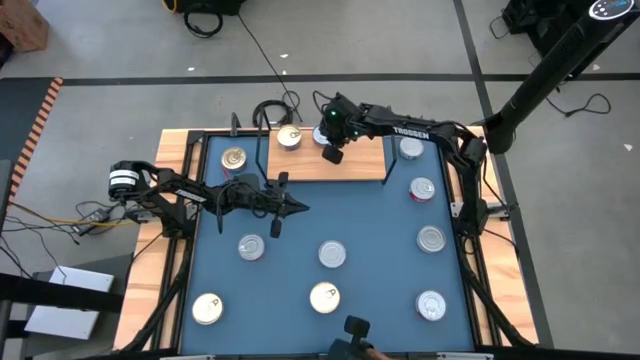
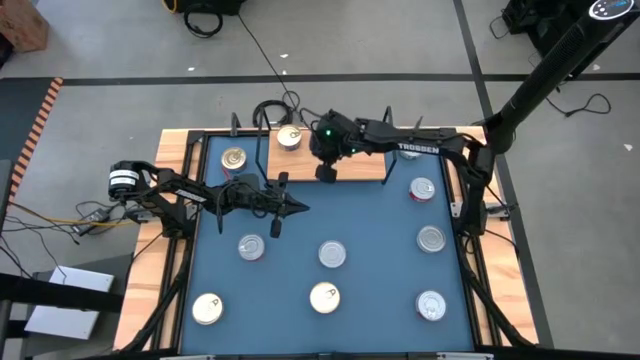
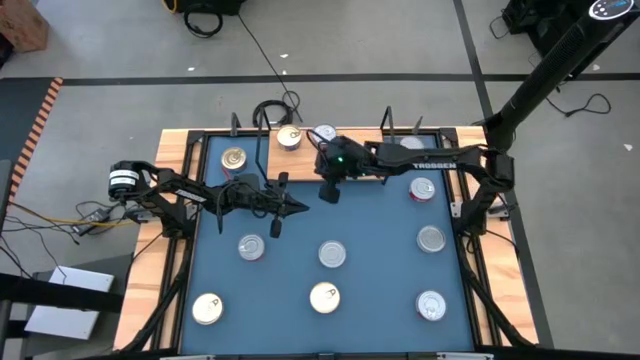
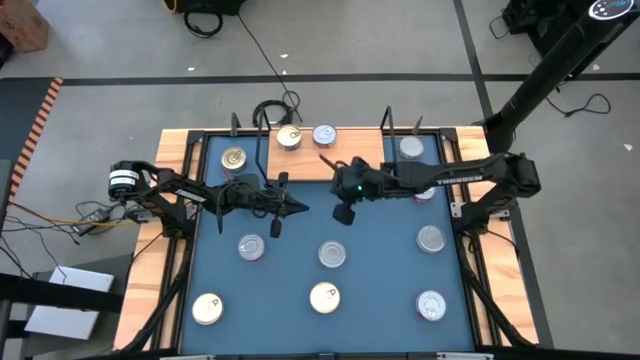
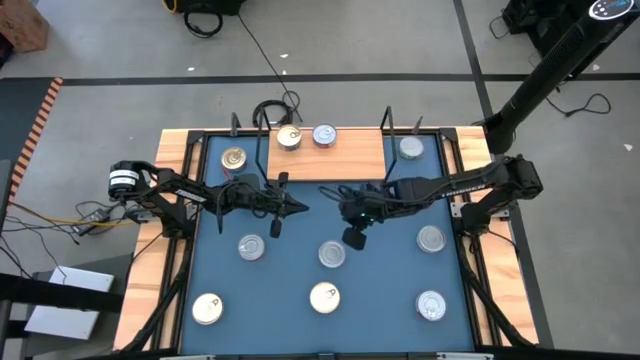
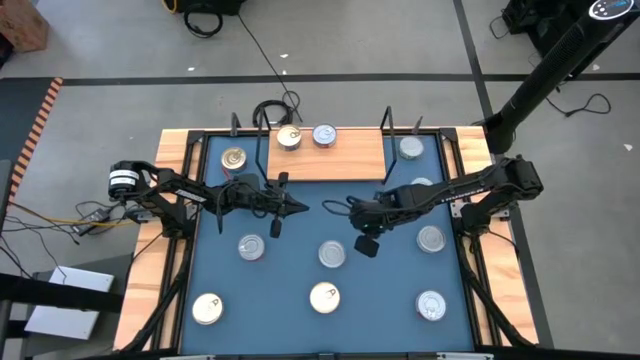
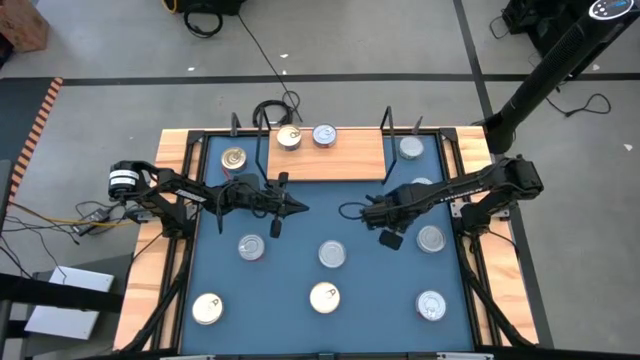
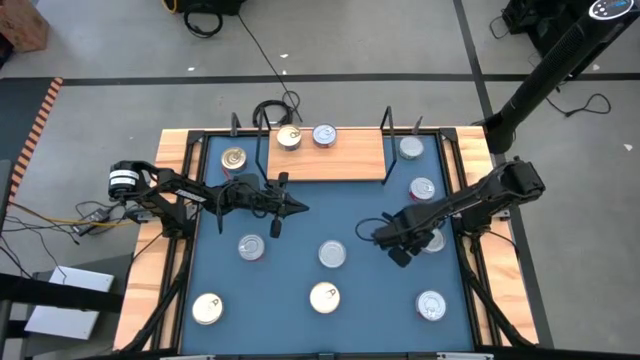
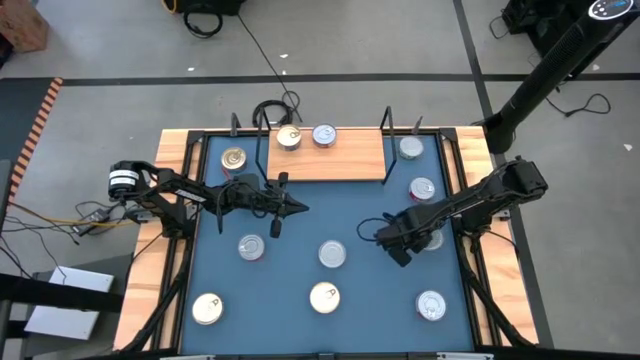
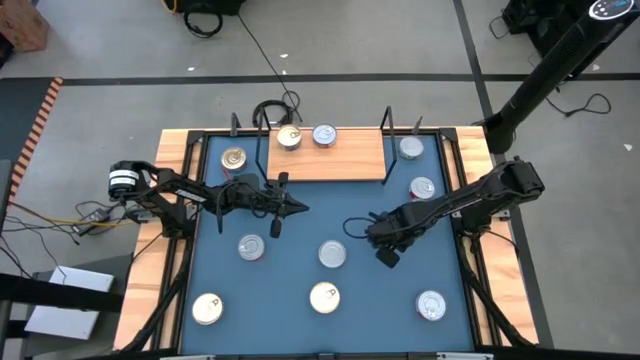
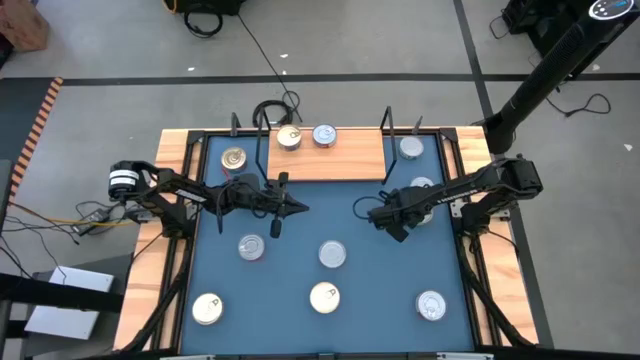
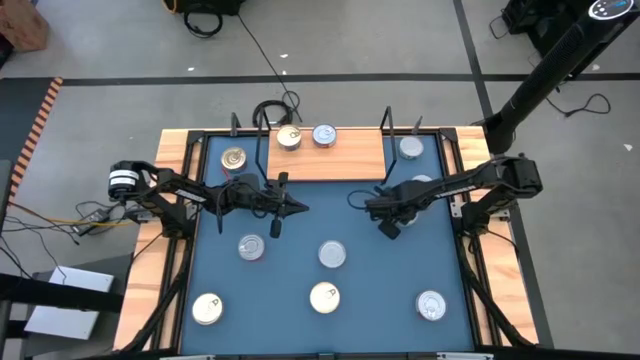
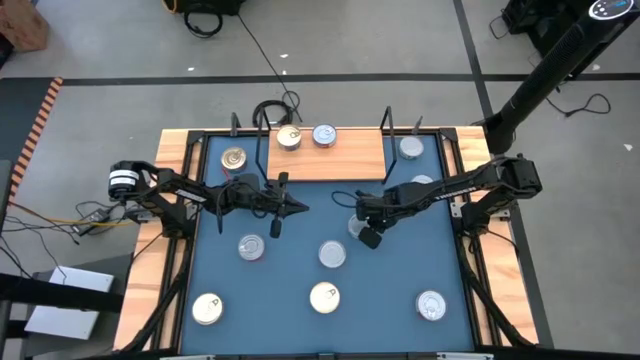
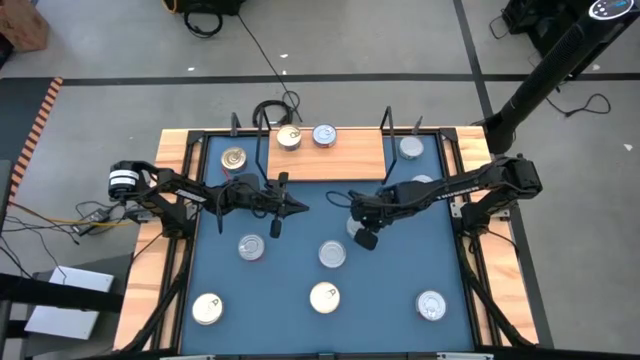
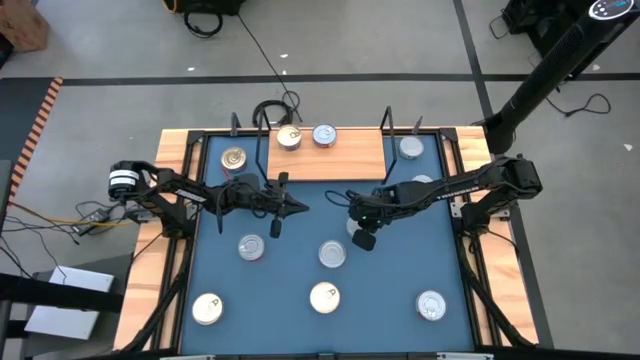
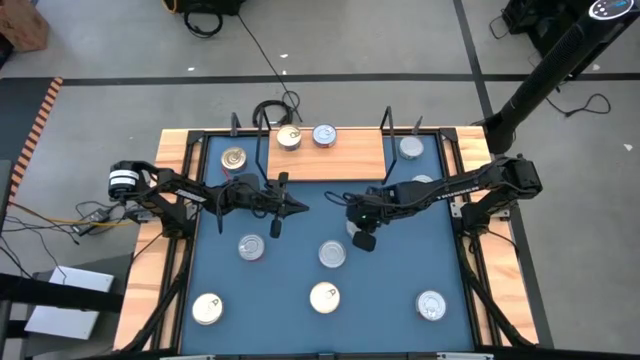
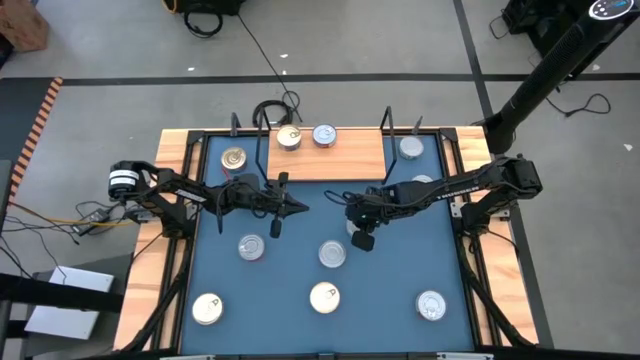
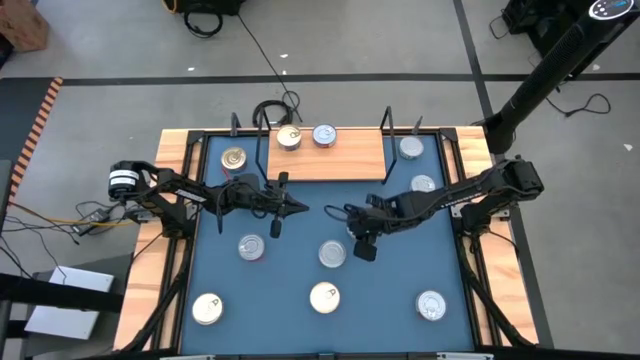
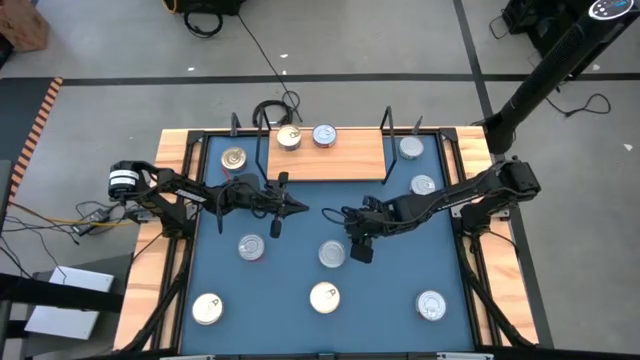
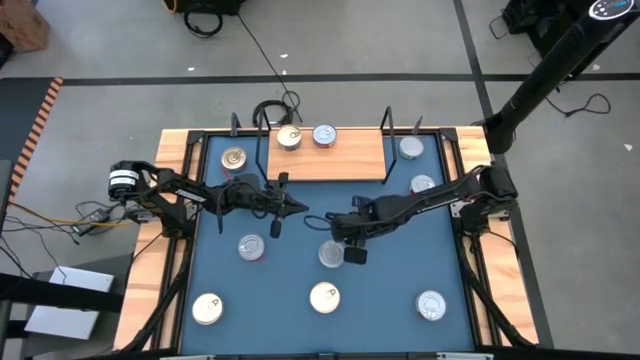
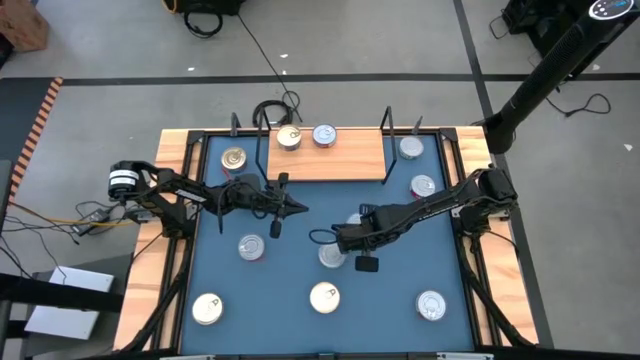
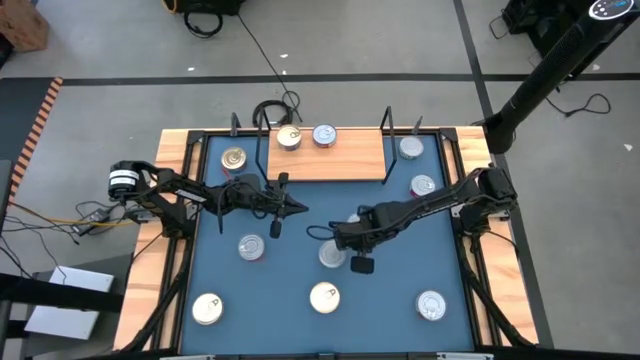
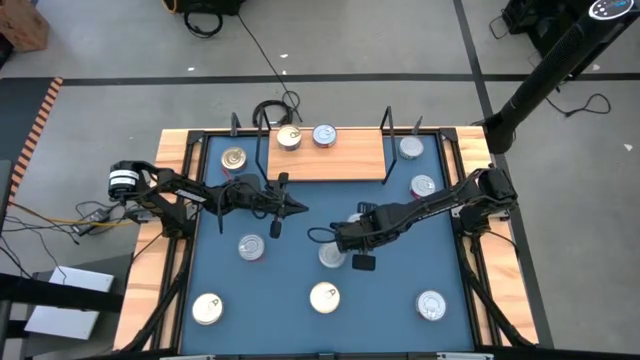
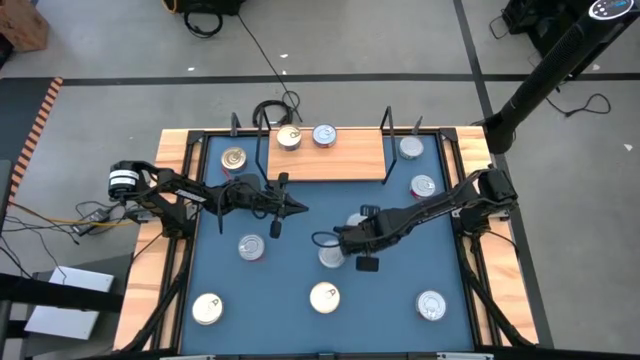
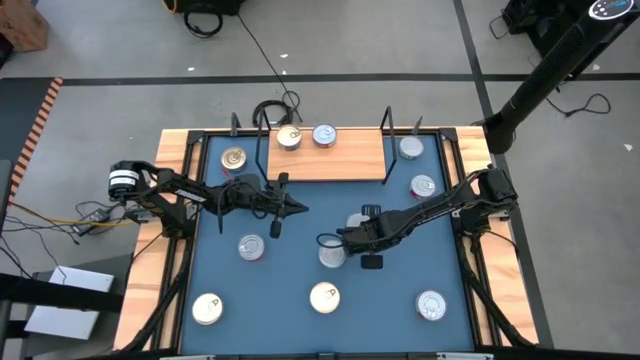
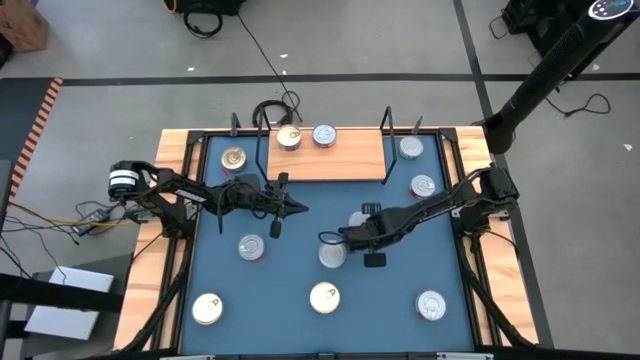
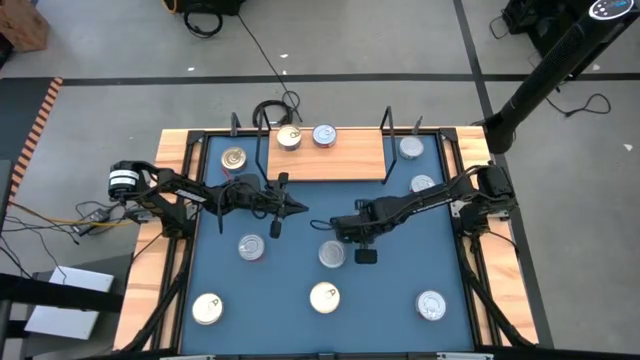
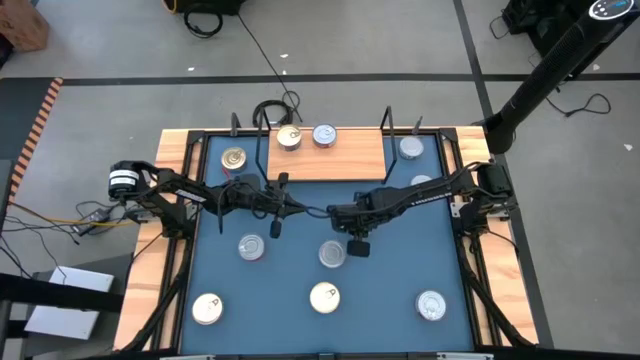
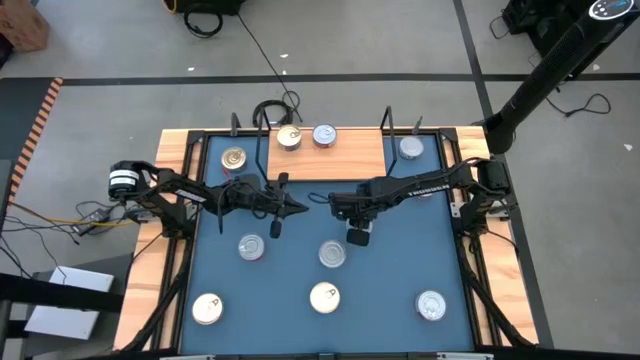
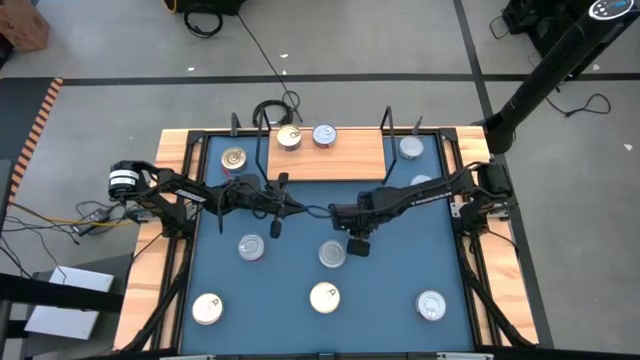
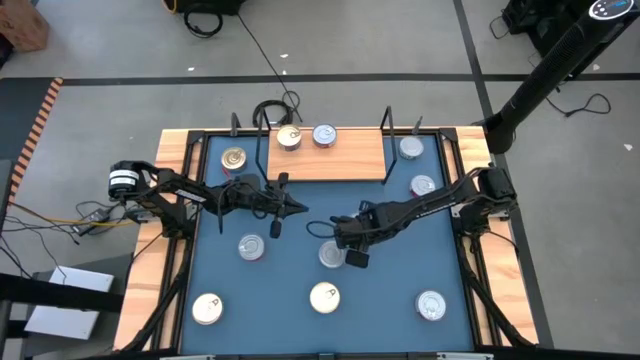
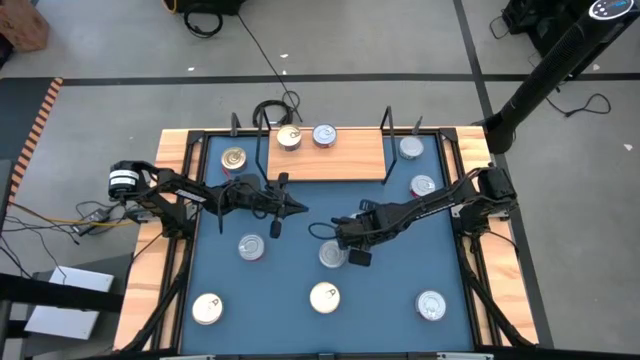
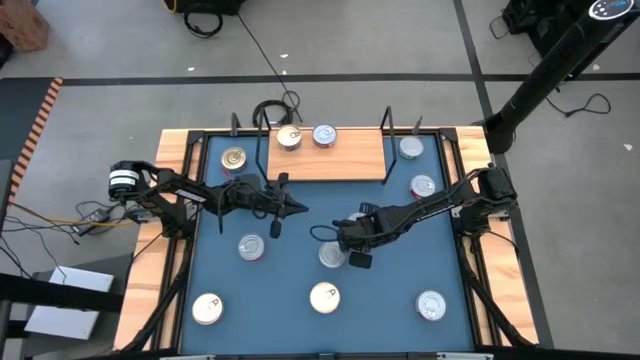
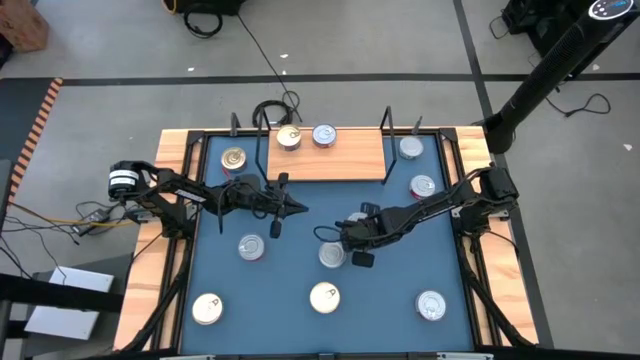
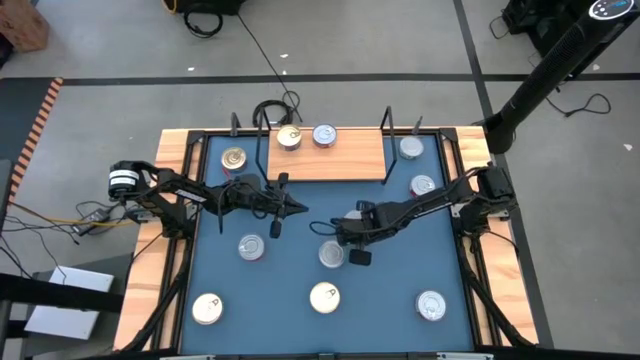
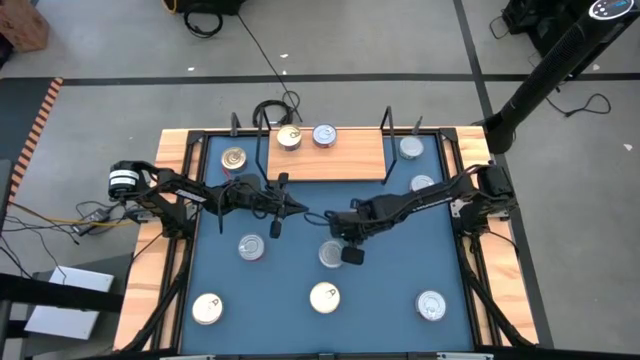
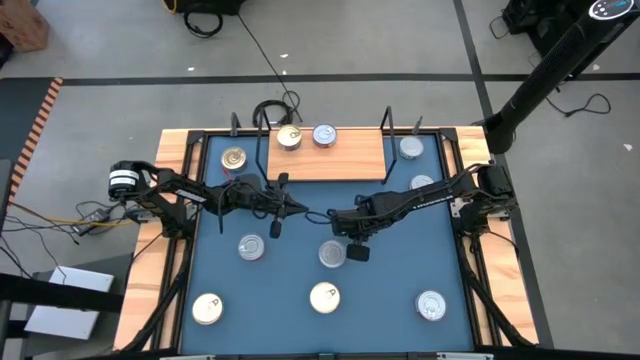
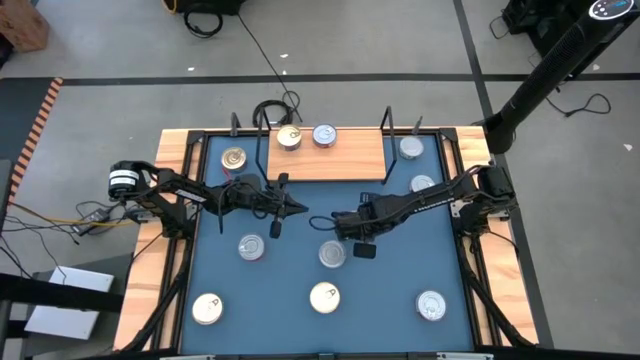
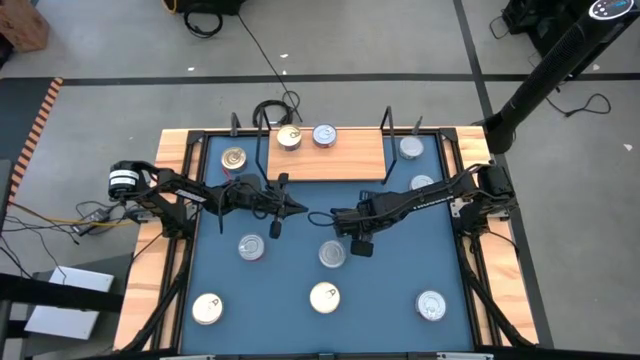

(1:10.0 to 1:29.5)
Task: Stack canned seafood by type on shelf
Put the bottom right white tuna can on the shelf

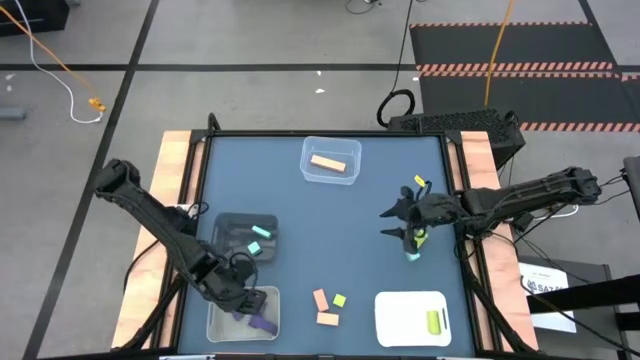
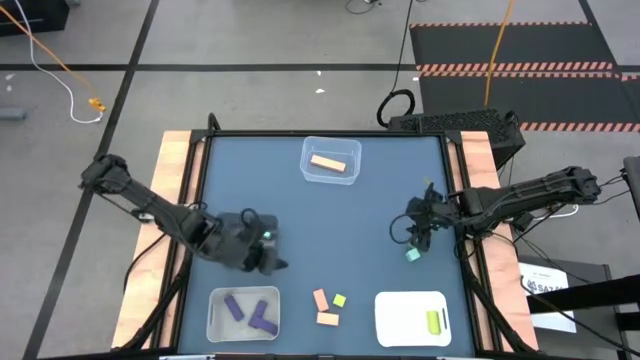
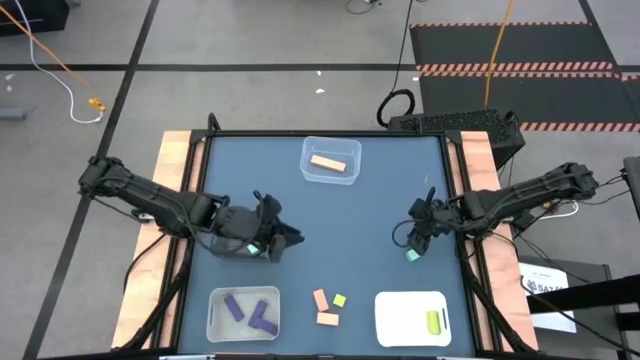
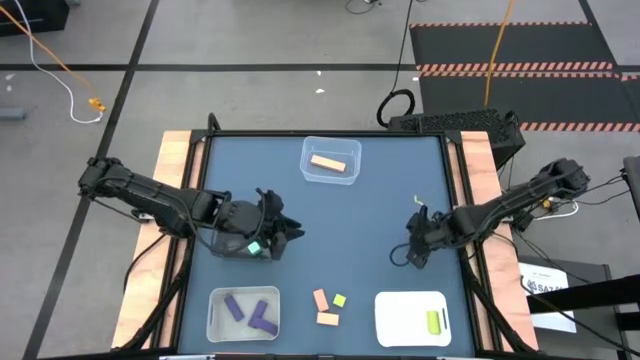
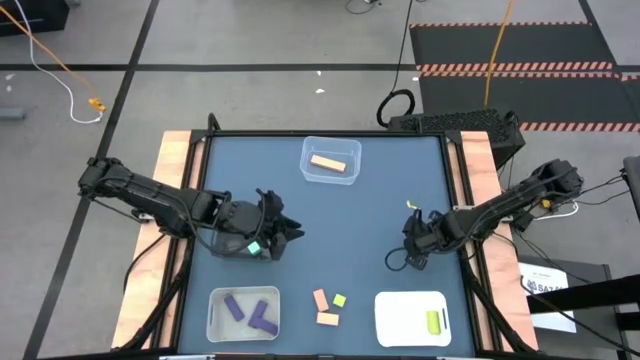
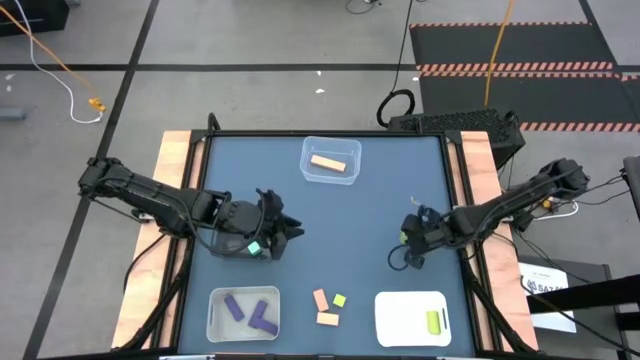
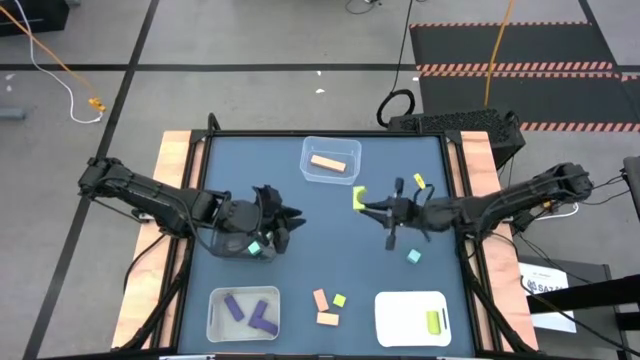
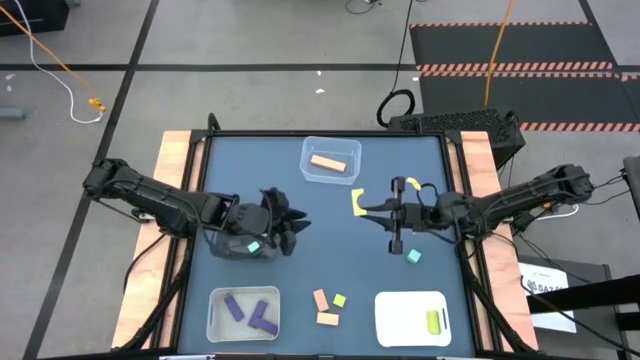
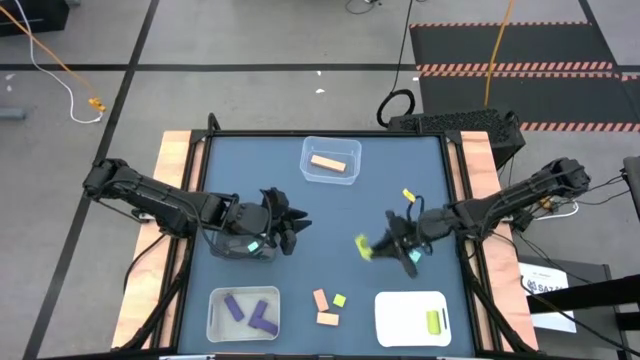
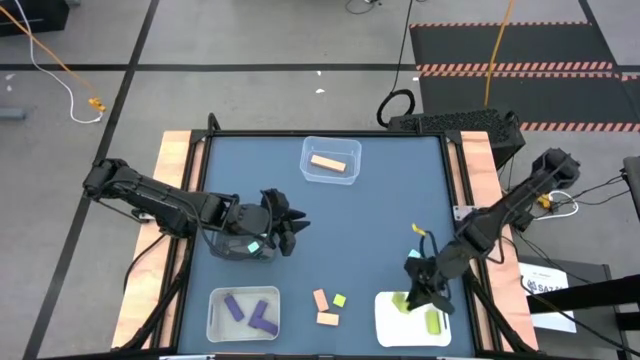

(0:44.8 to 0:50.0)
Task: Sort & place blocks by color
Put the top green blocks into the white bin
